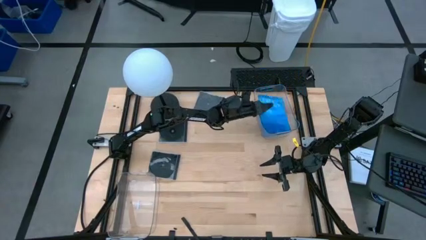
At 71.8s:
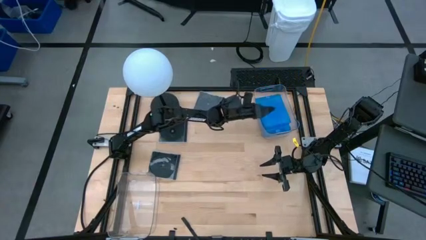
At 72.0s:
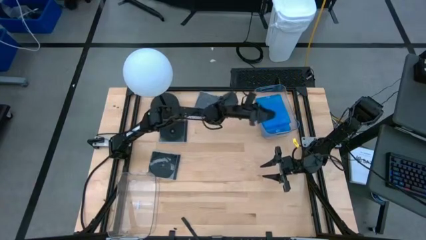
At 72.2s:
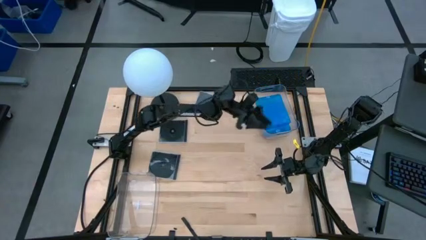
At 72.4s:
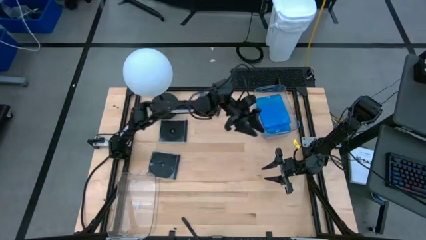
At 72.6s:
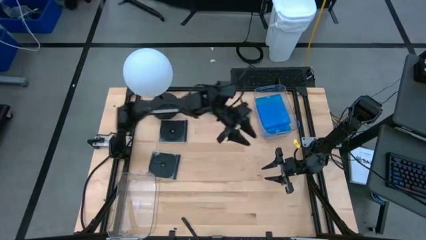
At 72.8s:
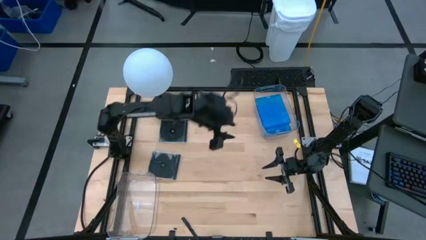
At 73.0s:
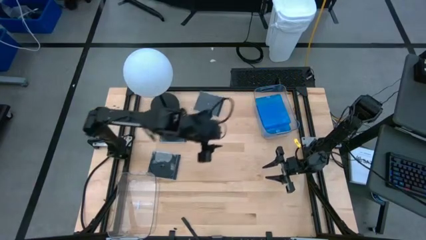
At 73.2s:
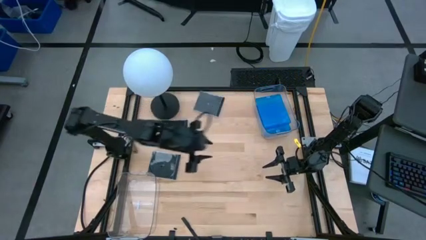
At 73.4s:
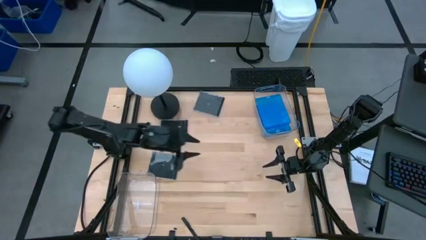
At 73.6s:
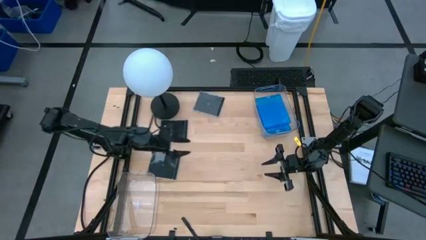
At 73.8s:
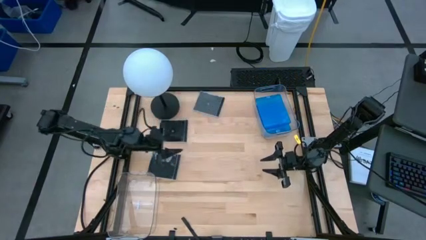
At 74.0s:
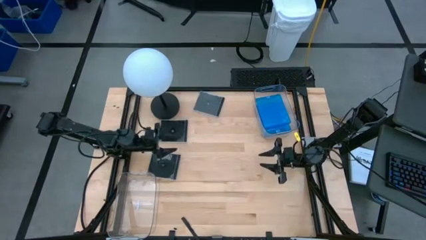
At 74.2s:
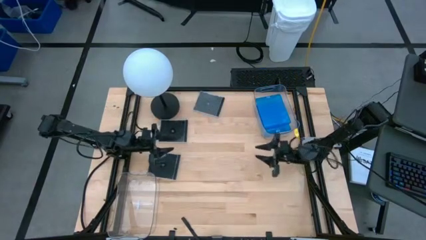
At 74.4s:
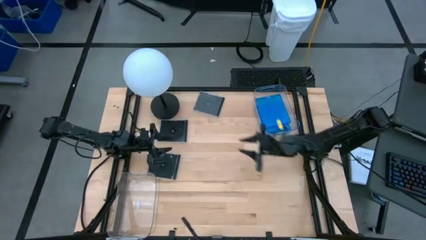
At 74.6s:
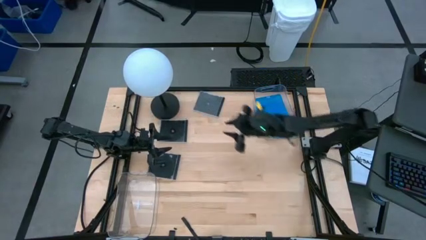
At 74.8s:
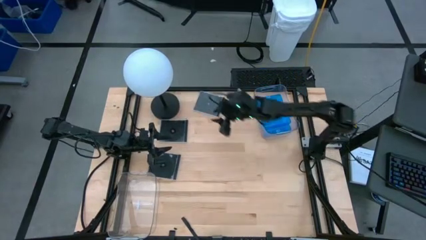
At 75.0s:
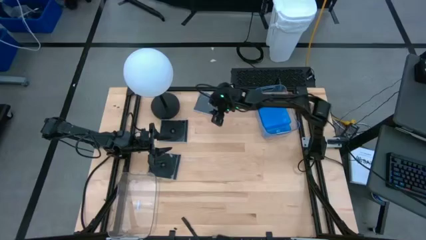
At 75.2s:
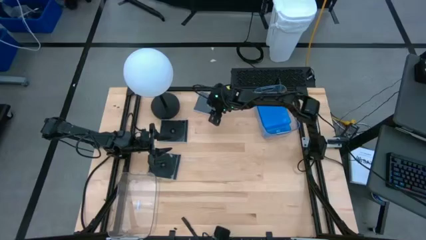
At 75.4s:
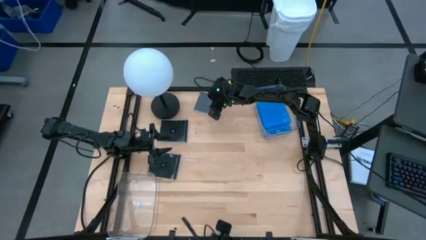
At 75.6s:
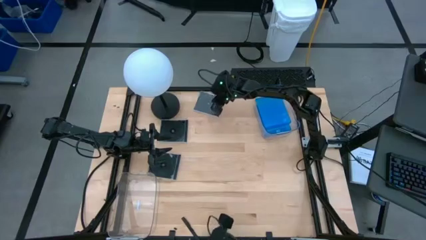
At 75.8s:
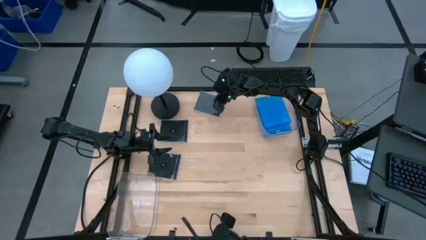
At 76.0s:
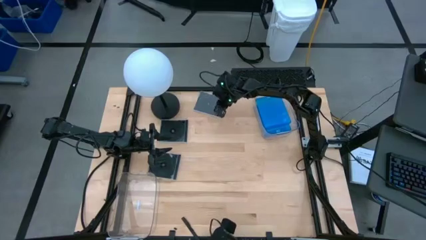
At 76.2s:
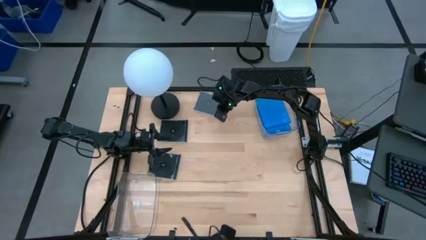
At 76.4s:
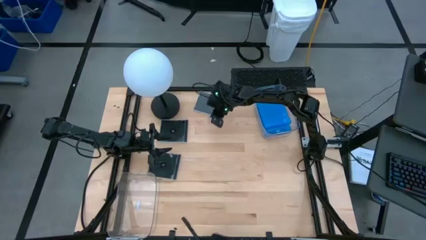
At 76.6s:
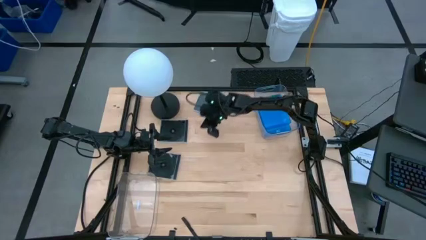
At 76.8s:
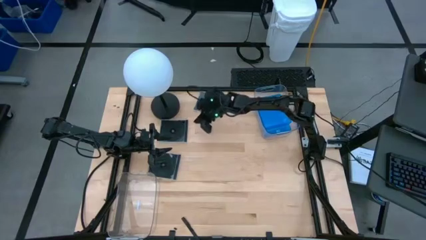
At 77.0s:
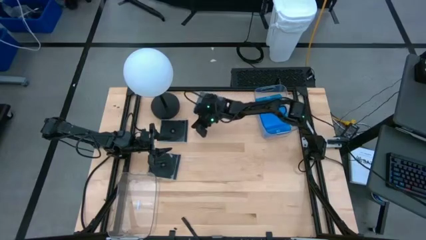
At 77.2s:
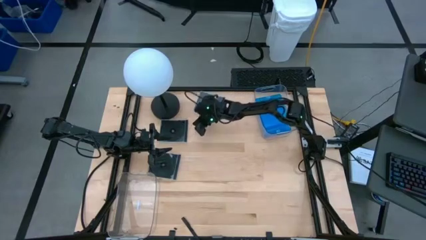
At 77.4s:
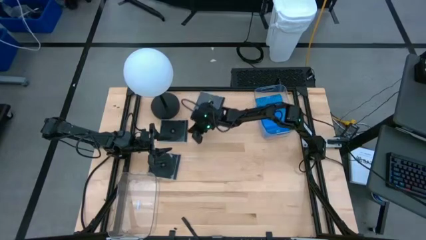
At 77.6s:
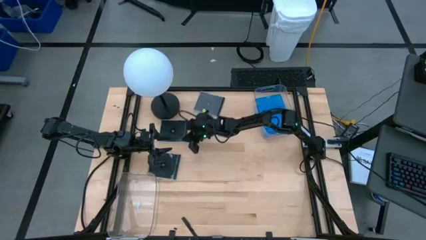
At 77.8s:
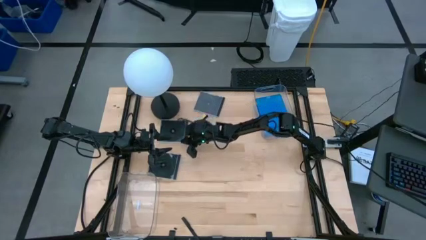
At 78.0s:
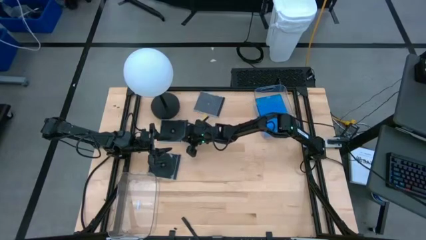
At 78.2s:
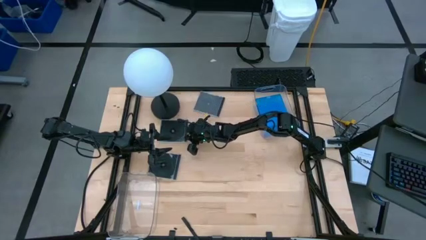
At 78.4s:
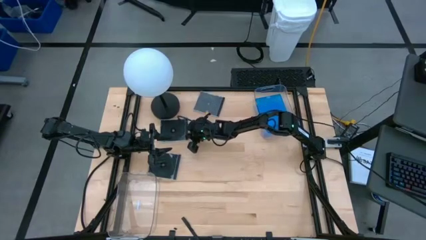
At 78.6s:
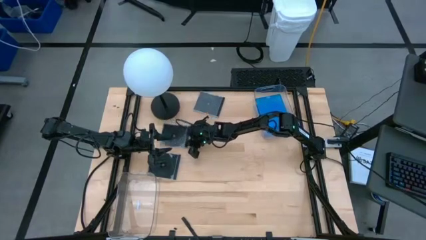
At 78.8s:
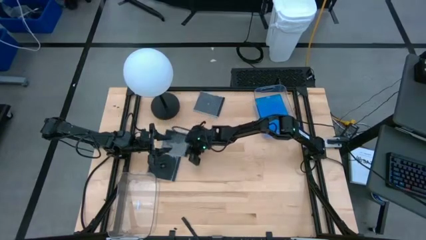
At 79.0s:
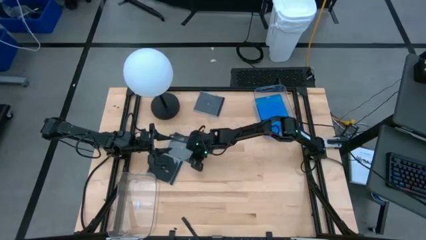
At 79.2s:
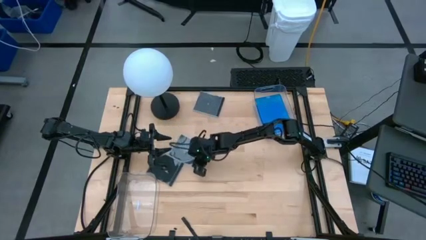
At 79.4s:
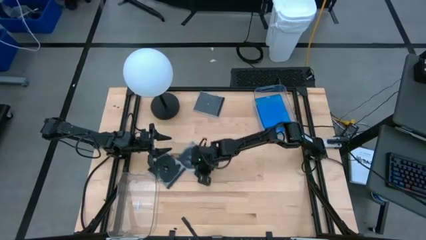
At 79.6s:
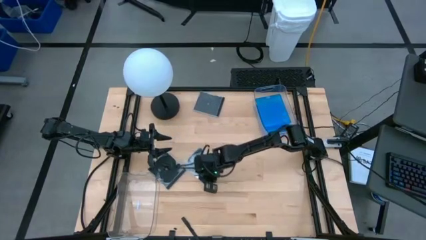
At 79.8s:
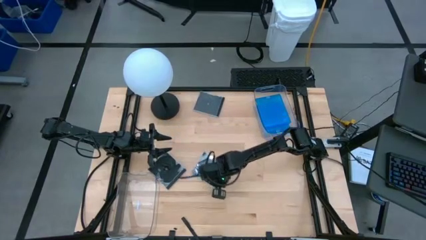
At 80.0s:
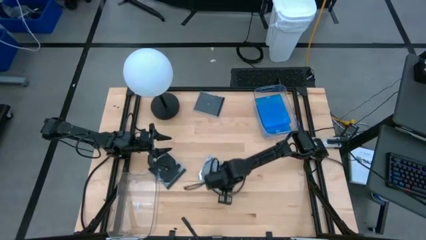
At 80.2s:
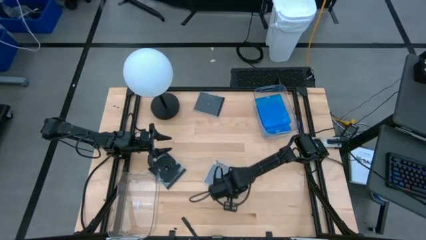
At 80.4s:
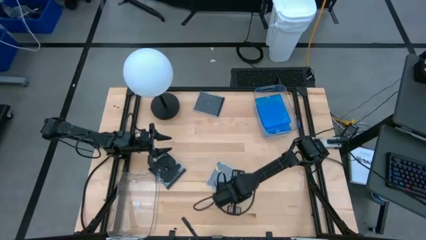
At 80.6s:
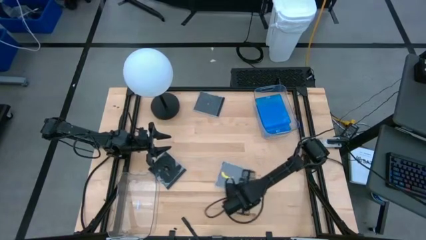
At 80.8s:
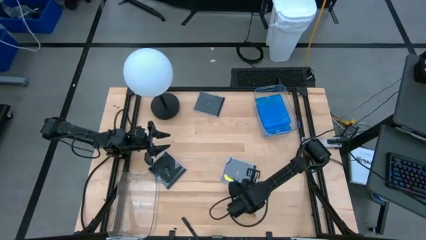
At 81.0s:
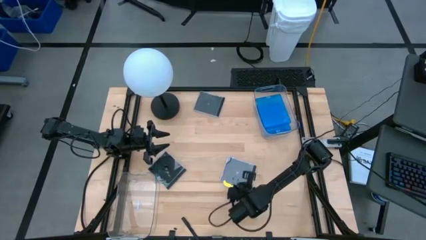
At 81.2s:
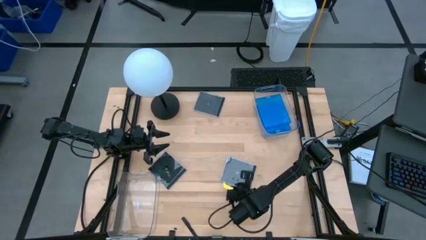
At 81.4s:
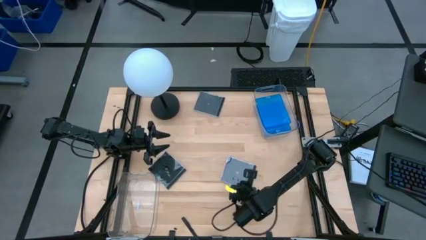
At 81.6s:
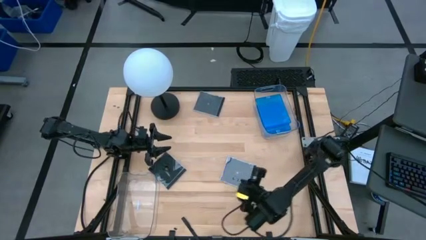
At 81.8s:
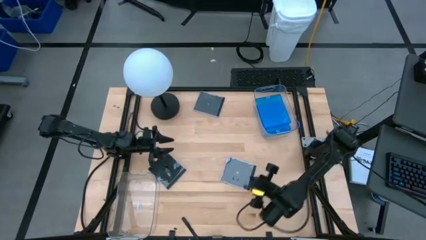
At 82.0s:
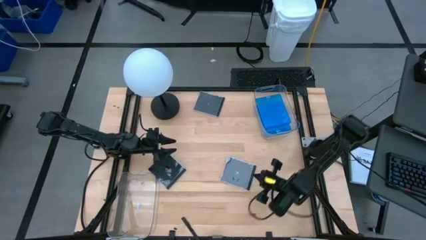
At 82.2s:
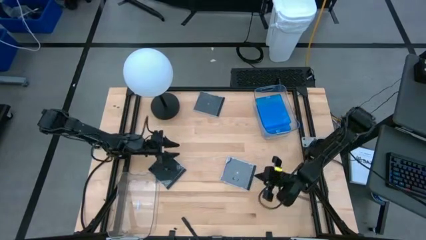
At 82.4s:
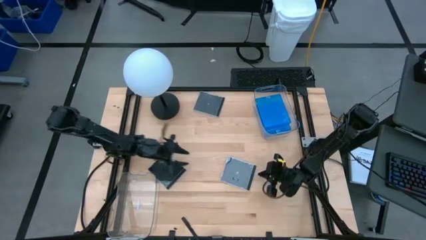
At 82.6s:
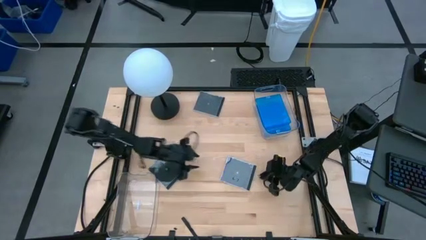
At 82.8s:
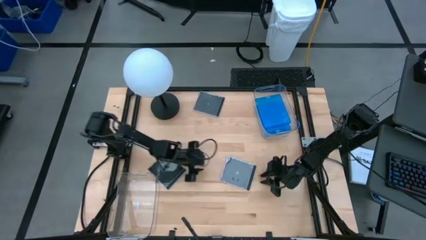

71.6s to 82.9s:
Task: Pick & place jewel cases by type
Put the middle black CD case into the bottom transparent bin

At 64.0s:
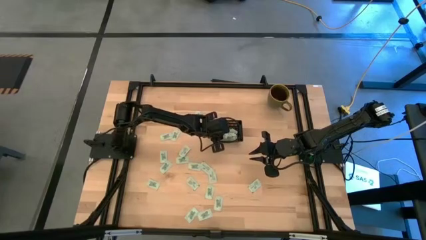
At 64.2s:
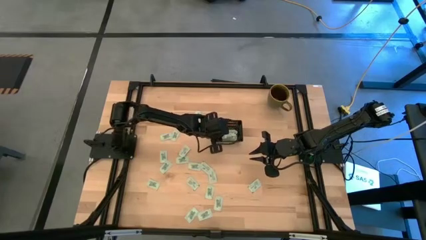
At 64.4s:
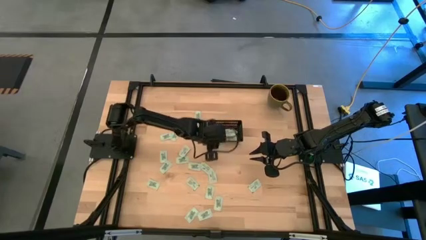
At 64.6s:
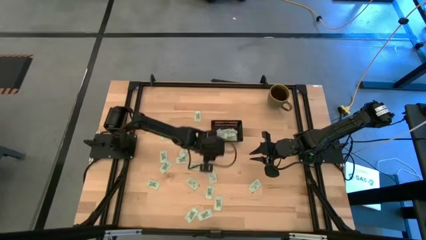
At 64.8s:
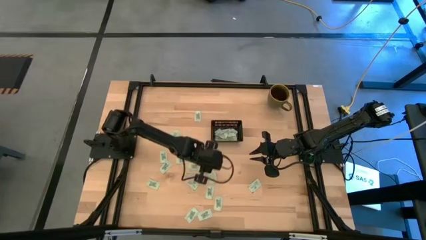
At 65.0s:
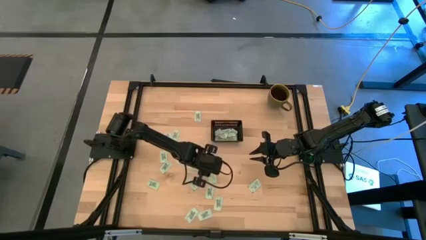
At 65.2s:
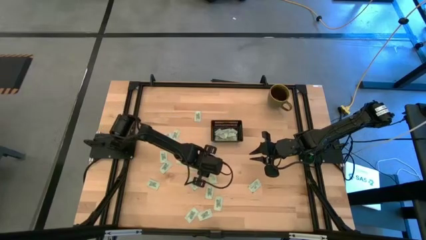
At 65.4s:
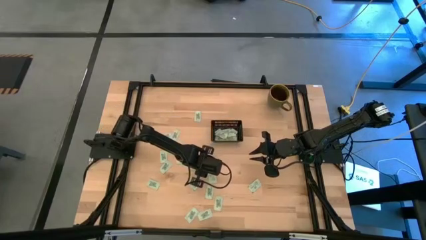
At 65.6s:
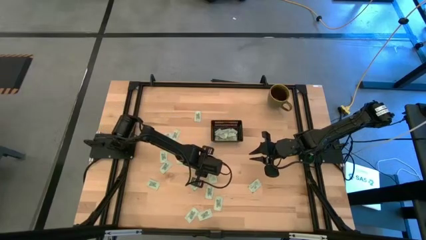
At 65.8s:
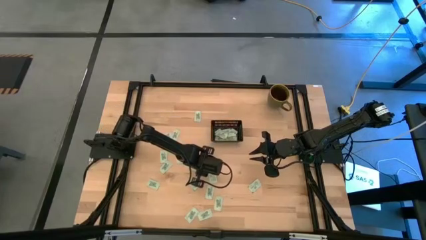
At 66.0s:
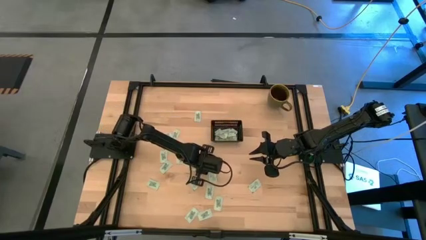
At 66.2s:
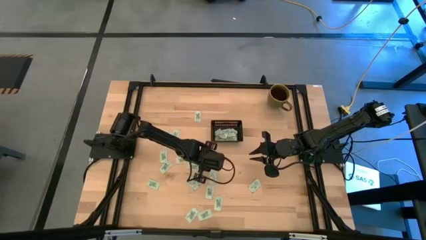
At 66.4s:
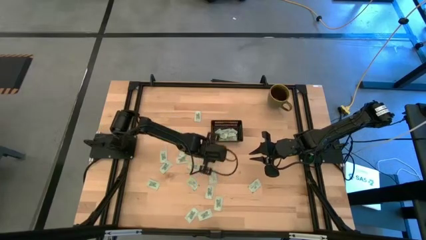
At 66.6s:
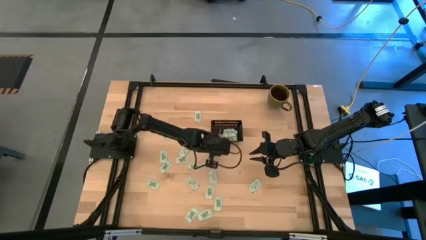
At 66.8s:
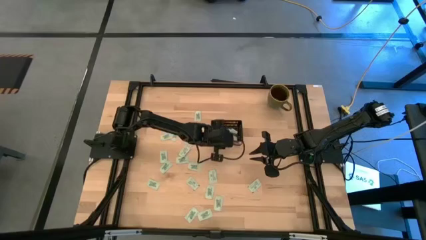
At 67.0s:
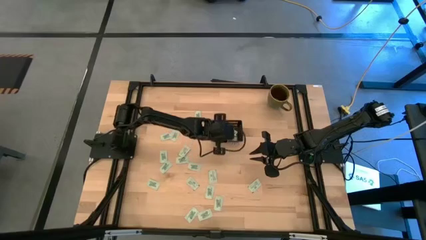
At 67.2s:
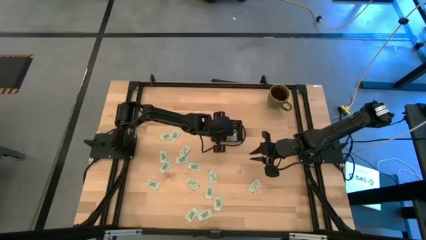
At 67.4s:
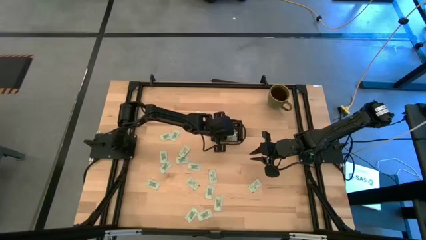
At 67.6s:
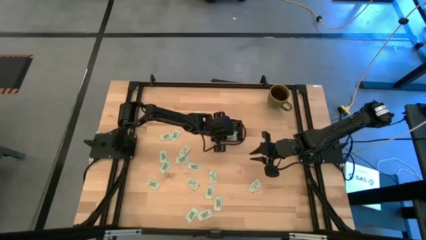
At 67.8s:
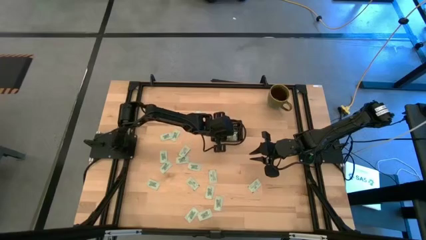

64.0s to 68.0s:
Task: Pick and place Stevia / Truvia into bins
Put the stevia packet into the black basket
